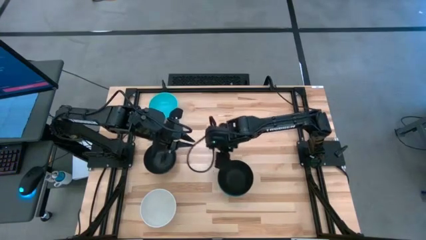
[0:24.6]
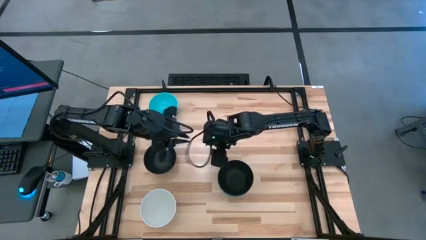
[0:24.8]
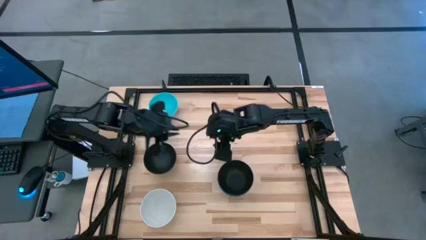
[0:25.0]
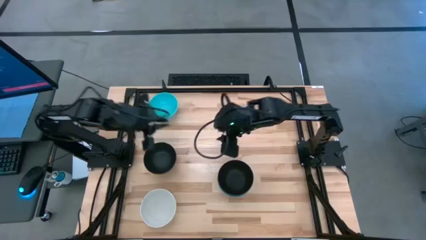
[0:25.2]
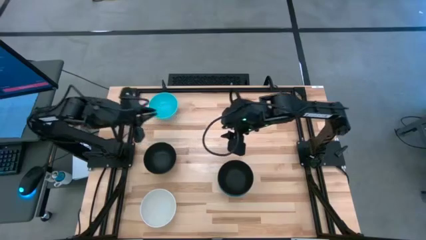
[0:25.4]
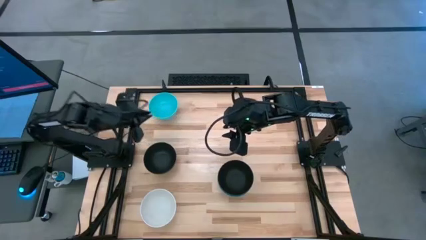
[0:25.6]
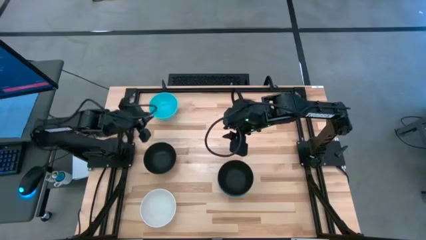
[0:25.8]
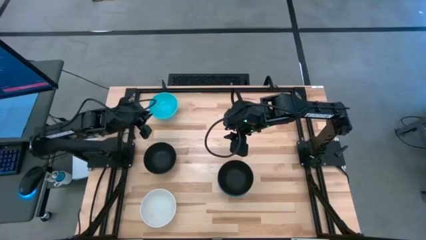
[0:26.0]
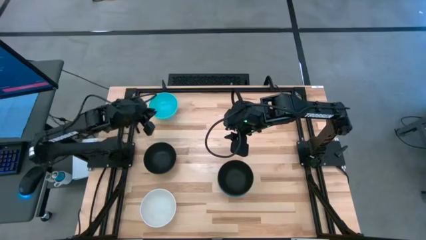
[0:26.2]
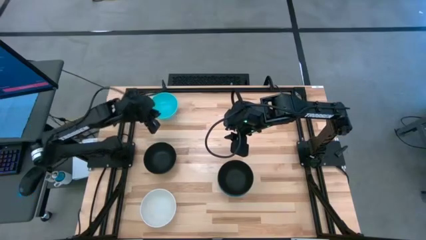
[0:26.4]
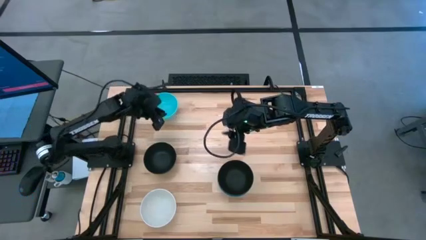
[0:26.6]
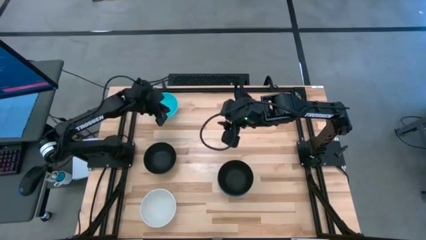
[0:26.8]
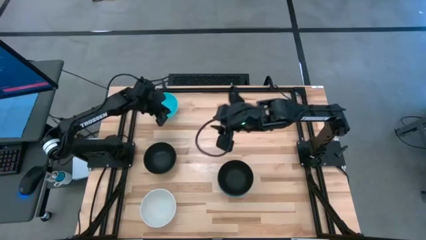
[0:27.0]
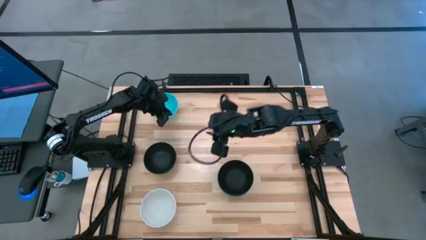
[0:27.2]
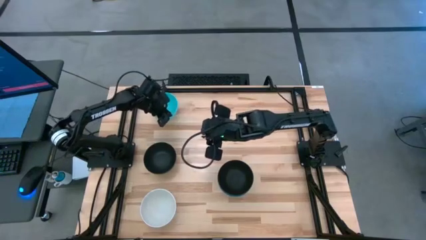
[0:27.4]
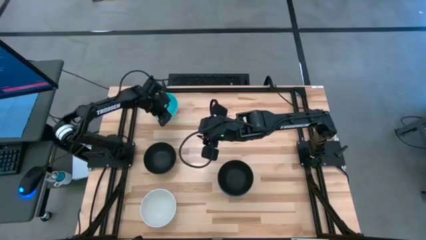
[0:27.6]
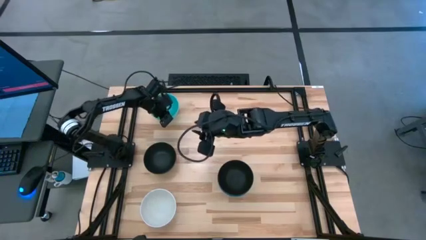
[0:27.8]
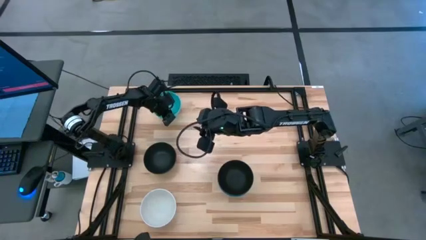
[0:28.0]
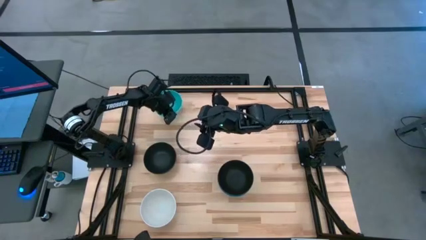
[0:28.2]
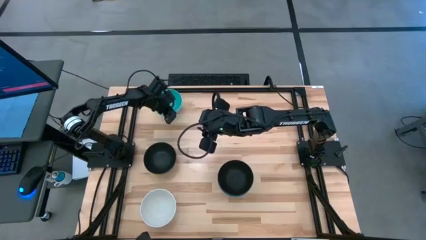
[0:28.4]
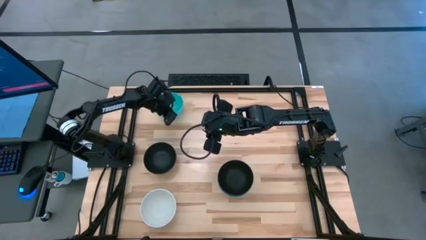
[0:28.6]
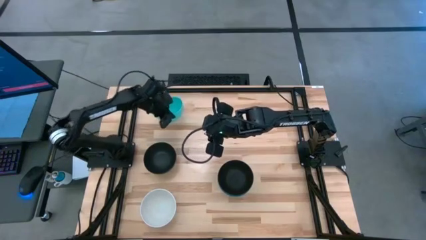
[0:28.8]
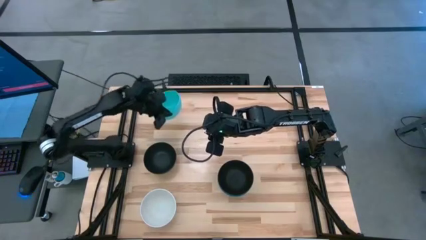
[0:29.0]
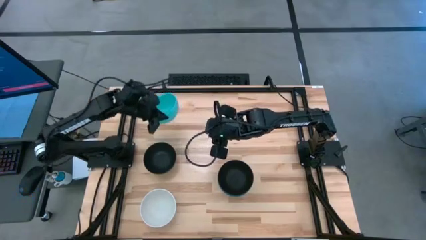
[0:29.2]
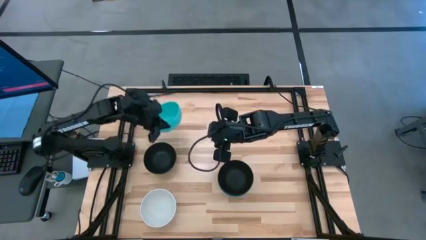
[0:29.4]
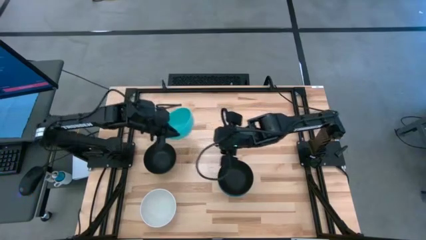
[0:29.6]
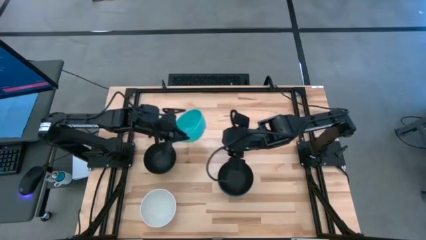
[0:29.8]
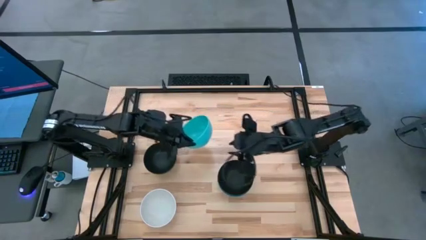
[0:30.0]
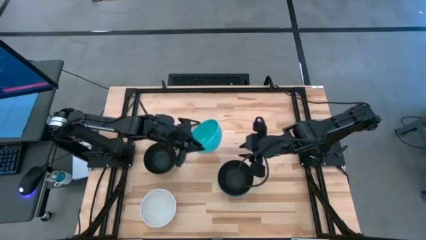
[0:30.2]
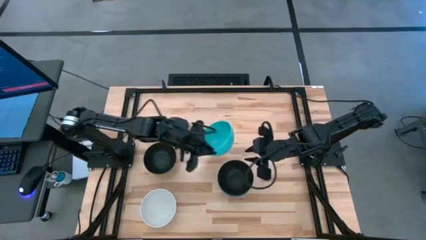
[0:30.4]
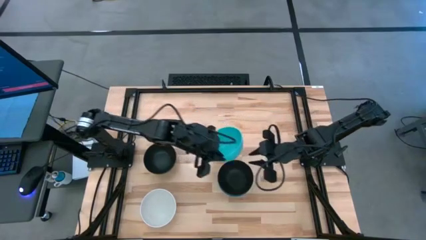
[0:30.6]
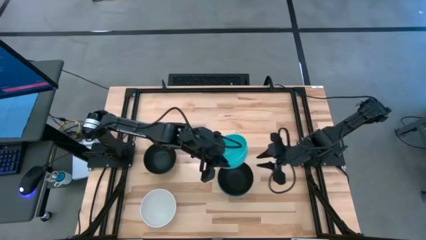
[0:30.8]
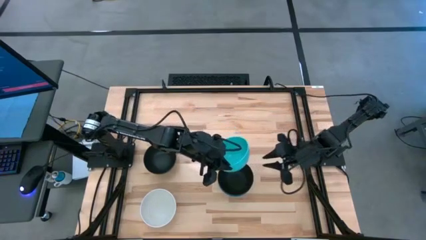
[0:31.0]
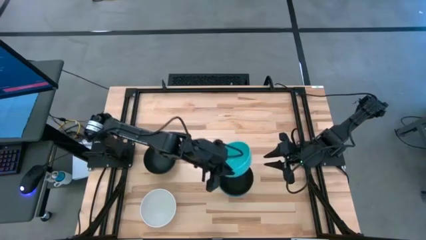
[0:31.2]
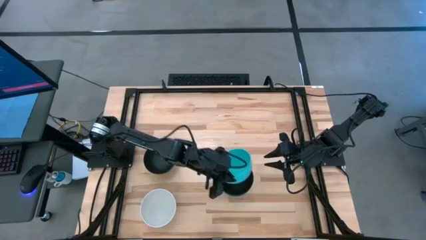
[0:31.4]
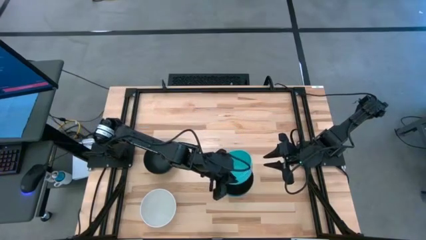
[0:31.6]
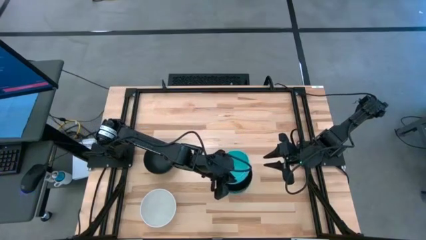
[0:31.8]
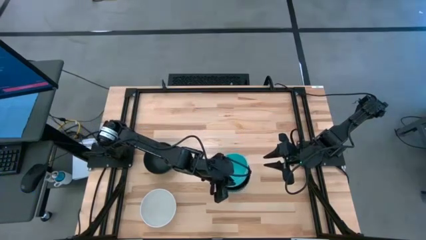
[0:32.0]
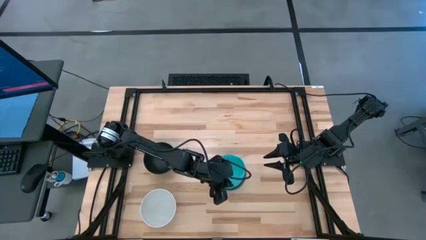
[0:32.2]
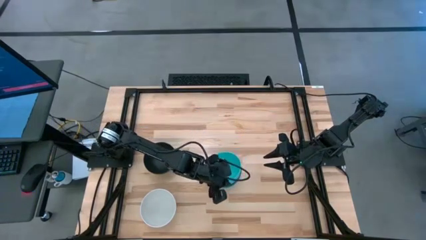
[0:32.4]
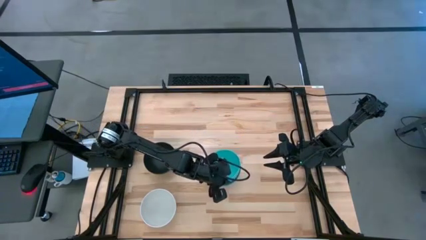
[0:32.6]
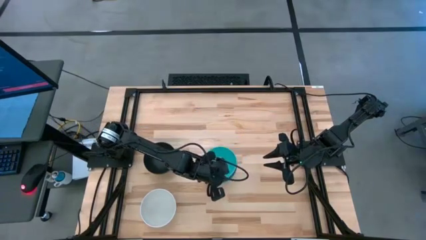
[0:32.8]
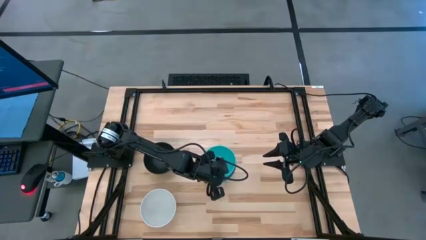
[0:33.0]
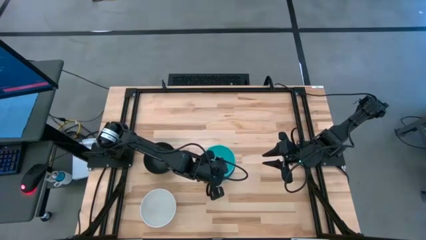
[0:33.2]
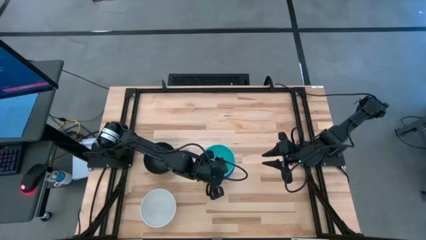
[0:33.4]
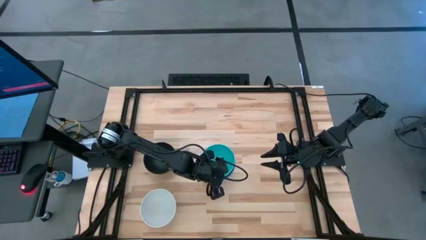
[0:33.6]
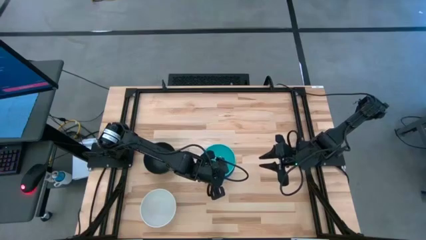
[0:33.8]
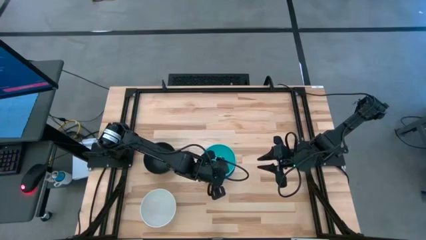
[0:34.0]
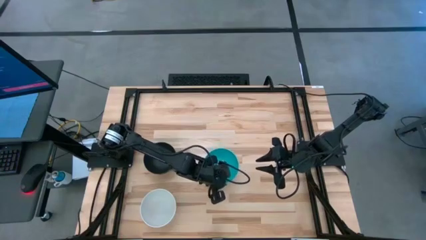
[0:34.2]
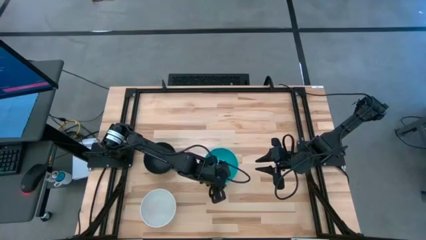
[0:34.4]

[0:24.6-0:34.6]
Task: Nest bowls inside each other
Stack the light blue bowl on top of the black bowl

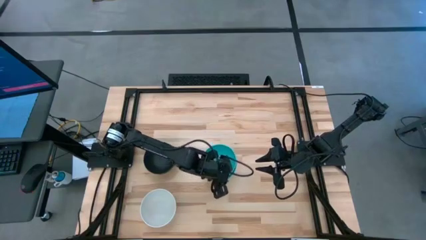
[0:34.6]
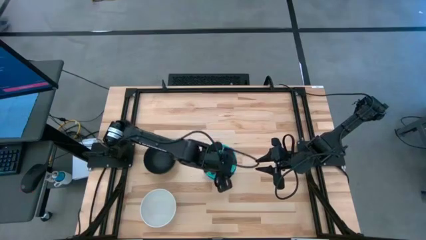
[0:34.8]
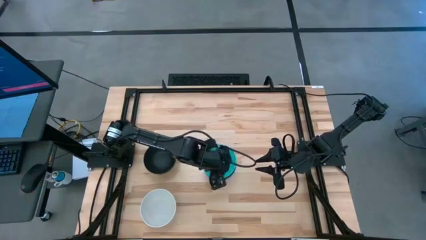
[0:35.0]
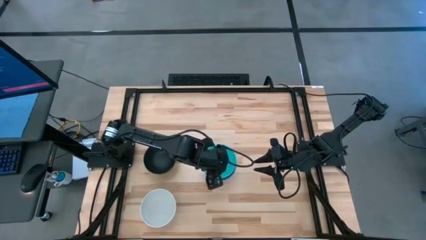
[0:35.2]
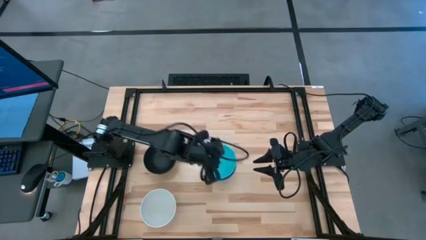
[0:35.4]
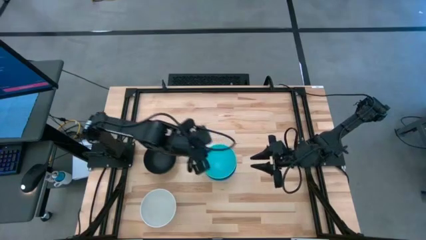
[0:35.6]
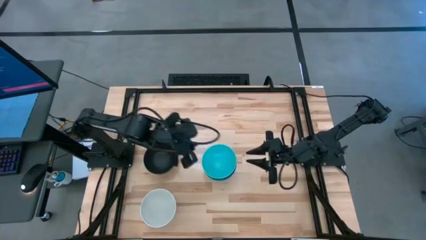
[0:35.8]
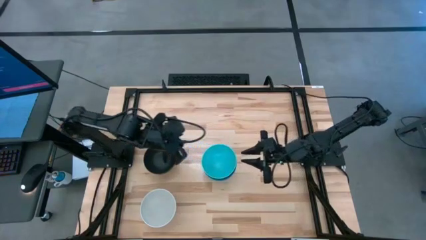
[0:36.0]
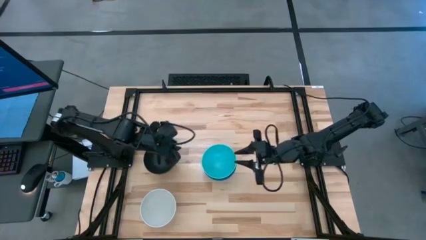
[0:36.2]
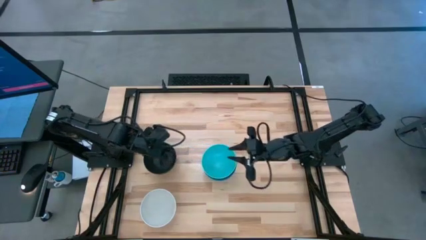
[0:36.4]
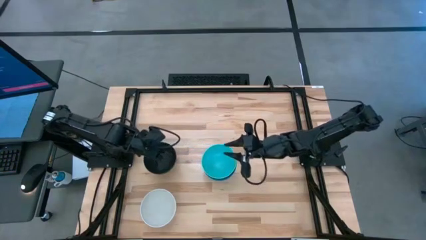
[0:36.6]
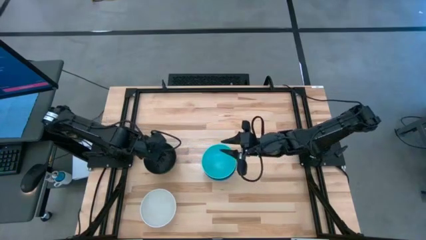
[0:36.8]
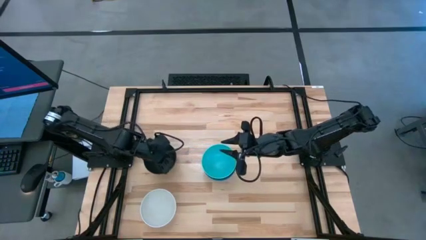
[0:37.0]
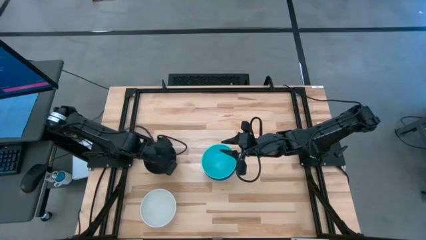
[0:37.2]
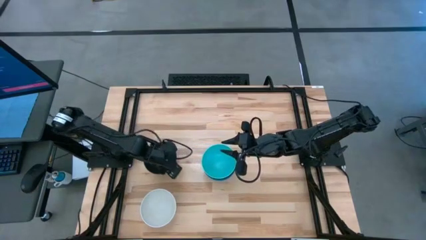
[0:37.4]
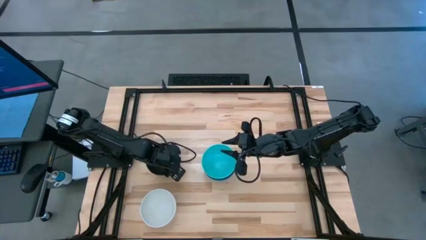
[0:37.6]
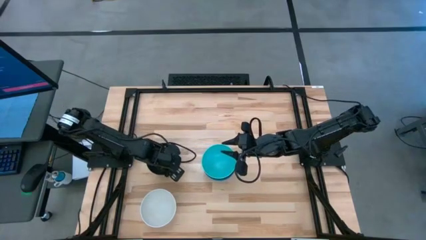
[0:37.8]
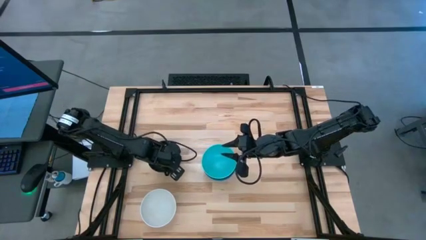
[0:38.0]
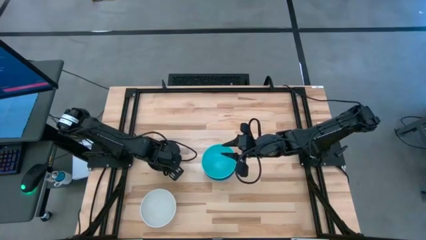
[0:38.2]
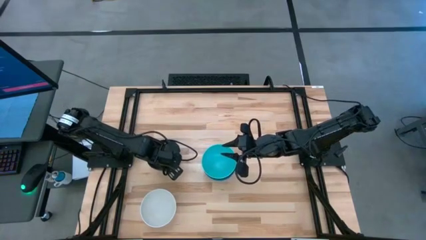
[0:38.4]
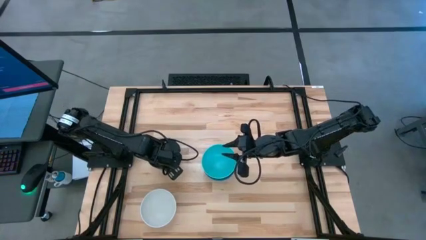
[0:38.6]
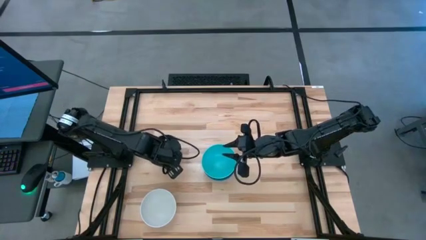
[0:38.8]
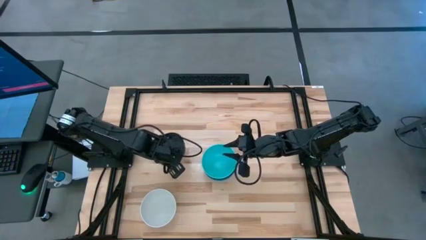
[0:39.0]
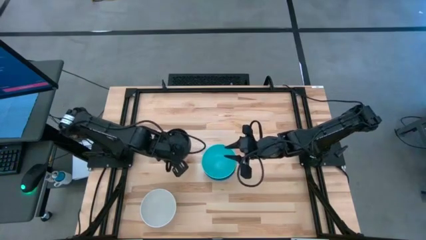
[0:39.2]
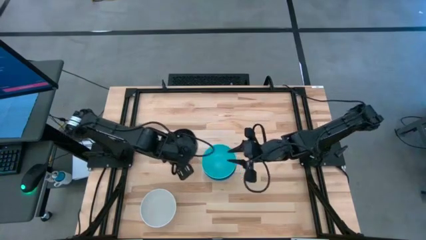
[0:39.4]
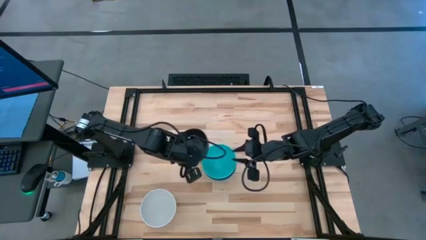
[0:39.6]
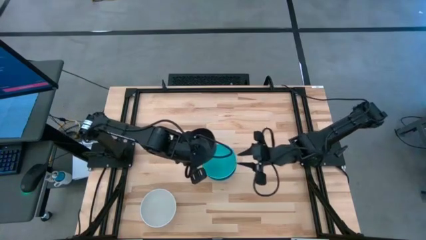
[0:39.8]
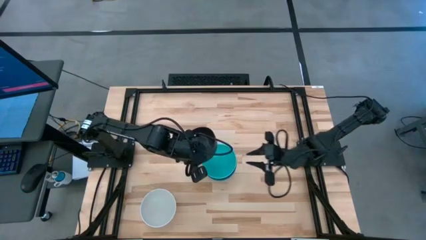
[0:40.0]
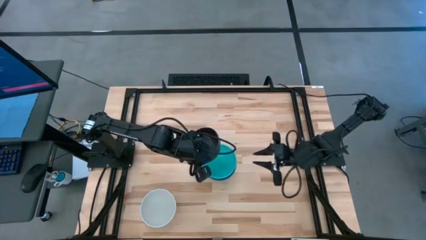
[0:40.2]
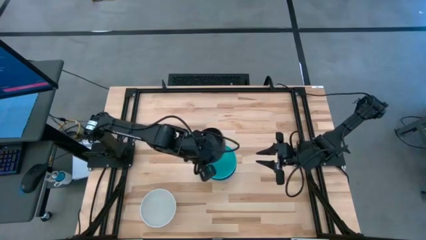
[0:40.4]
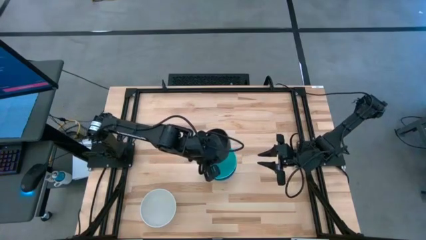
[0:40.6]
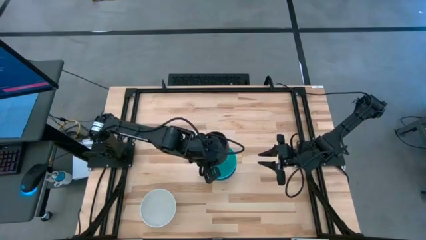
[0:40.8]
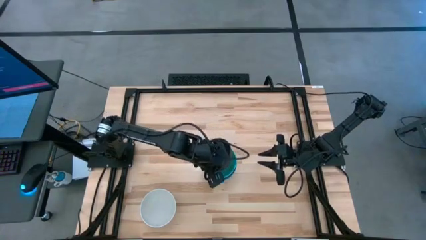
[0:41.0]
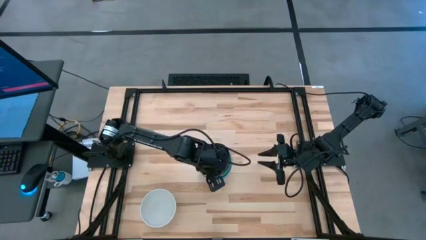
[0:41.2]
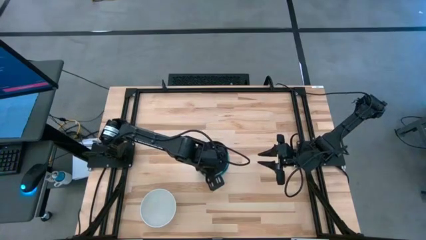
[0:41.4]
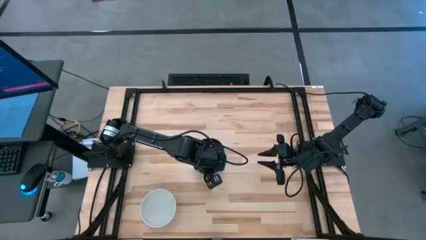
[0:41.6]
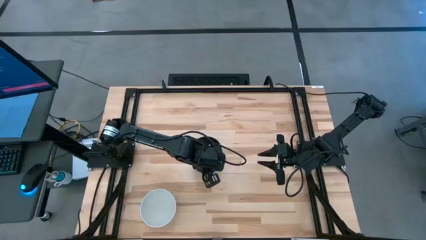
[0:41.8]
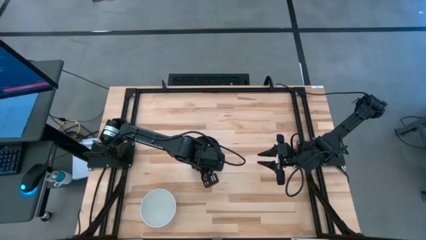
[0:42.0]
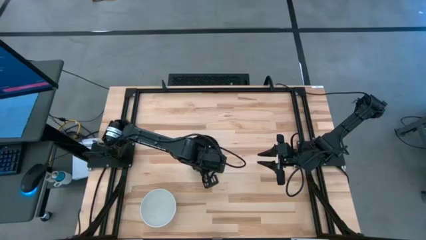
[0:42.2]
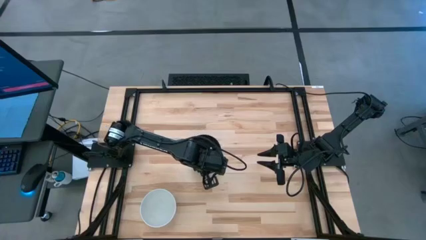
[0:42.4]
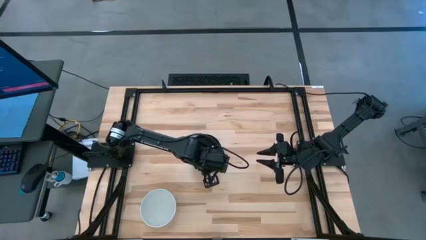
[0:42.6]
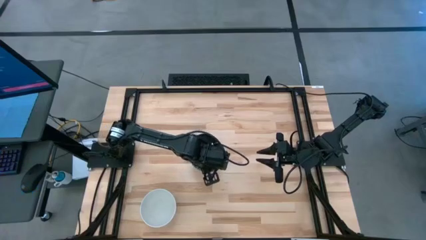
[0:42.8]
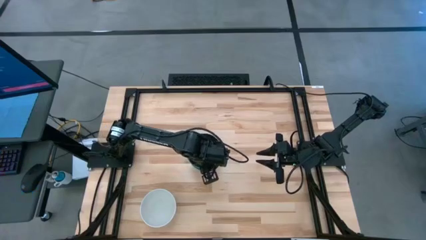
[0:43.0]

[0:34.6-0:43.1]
Stack the black bowl on the light blue bowl
